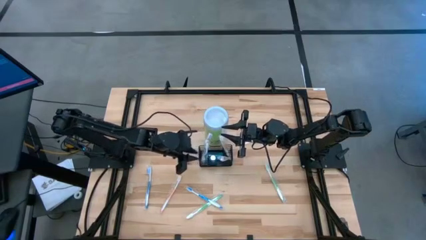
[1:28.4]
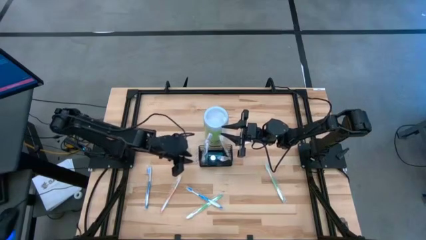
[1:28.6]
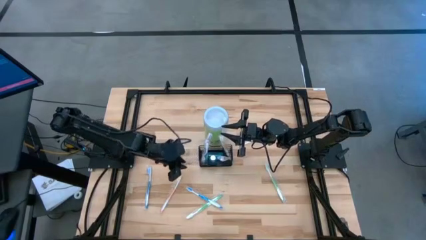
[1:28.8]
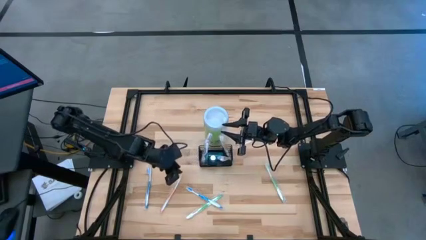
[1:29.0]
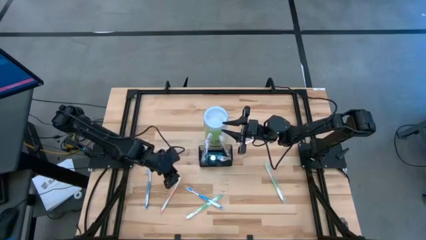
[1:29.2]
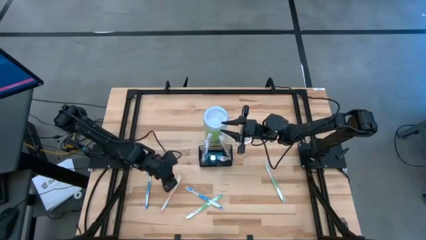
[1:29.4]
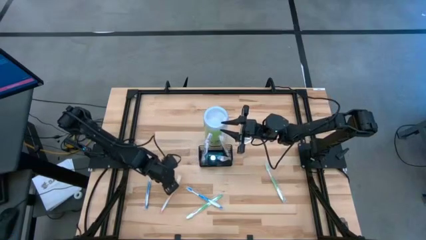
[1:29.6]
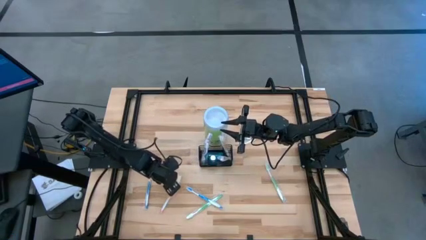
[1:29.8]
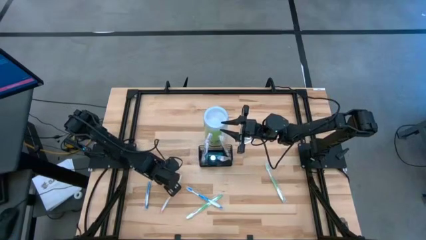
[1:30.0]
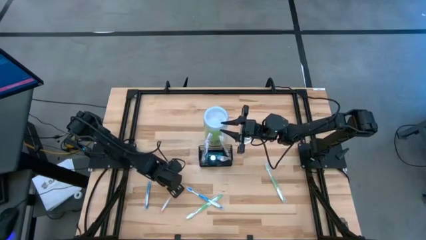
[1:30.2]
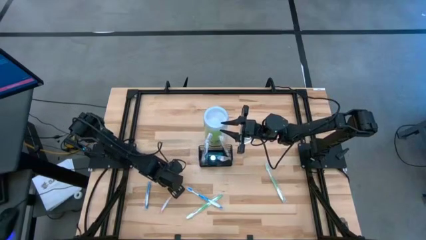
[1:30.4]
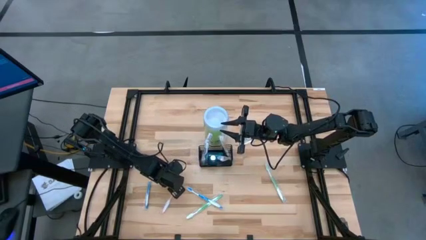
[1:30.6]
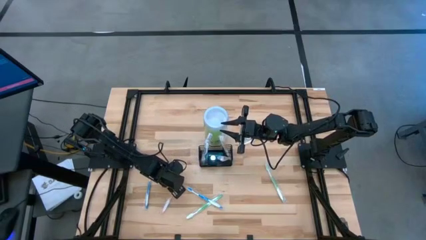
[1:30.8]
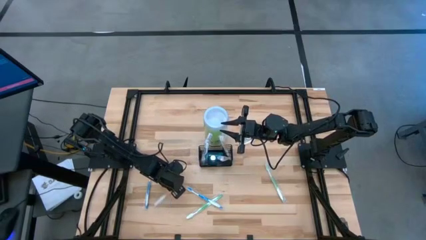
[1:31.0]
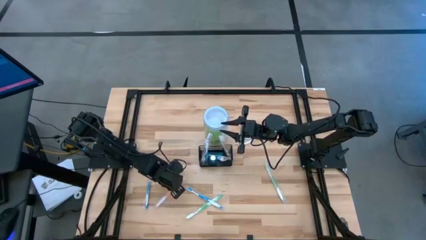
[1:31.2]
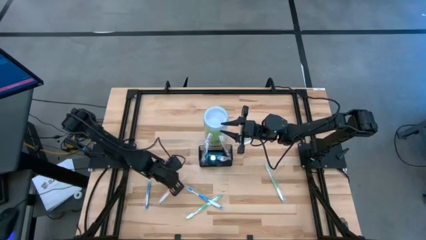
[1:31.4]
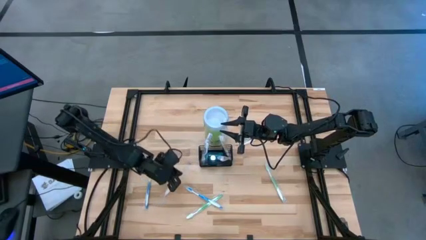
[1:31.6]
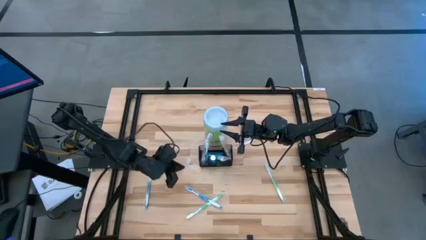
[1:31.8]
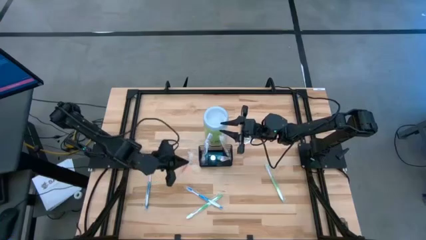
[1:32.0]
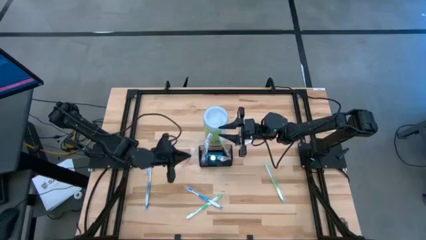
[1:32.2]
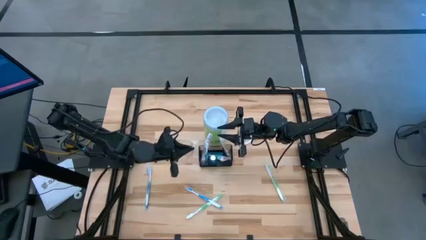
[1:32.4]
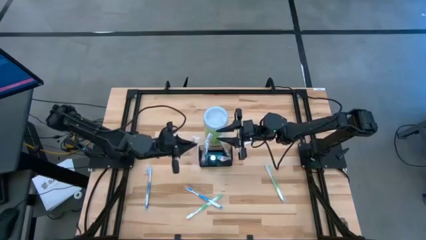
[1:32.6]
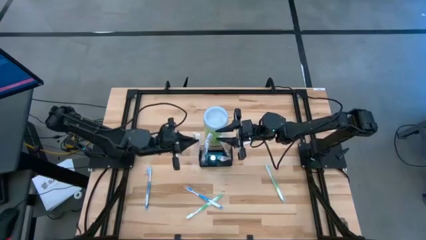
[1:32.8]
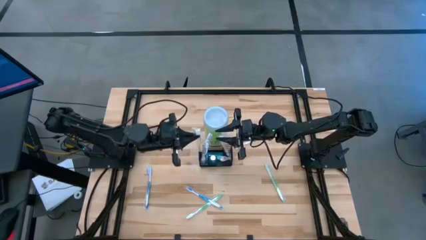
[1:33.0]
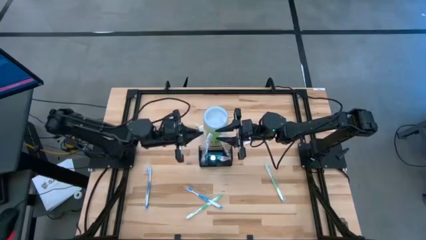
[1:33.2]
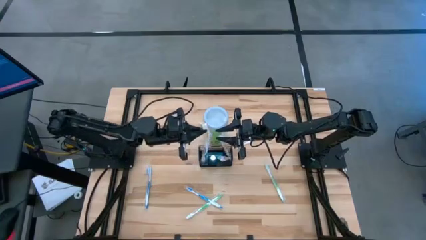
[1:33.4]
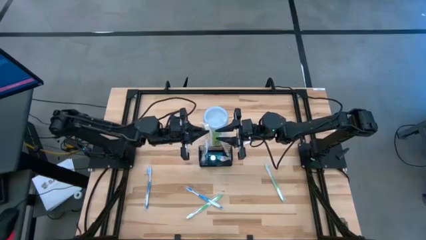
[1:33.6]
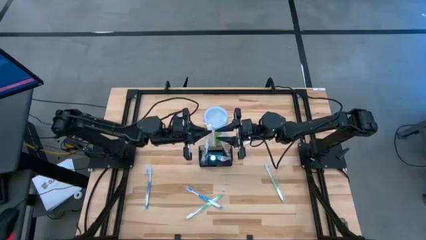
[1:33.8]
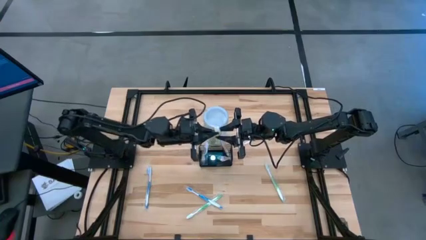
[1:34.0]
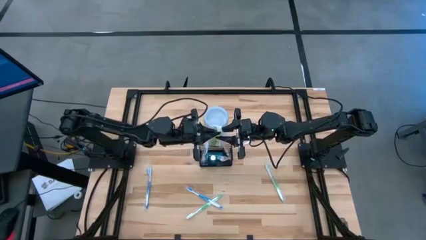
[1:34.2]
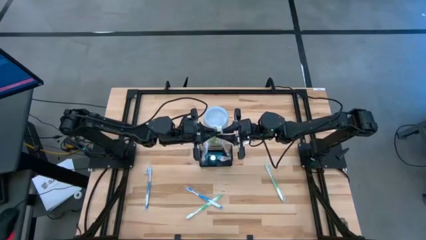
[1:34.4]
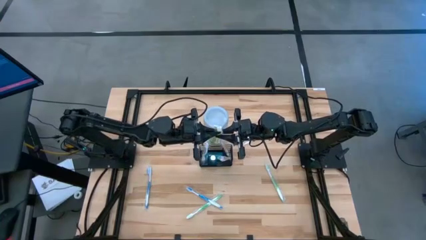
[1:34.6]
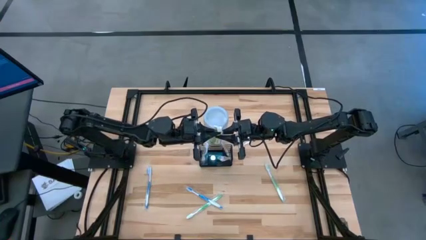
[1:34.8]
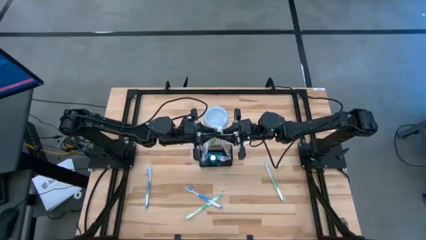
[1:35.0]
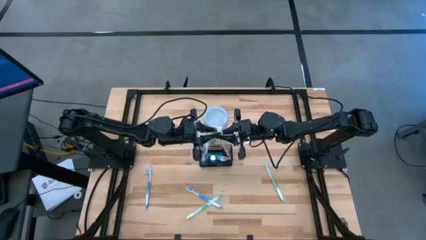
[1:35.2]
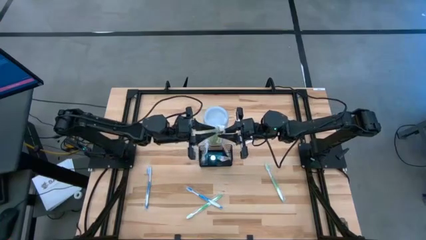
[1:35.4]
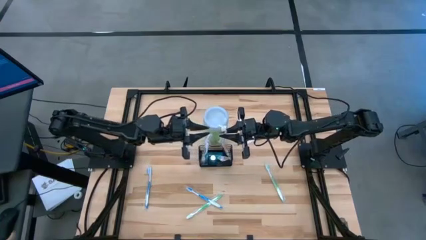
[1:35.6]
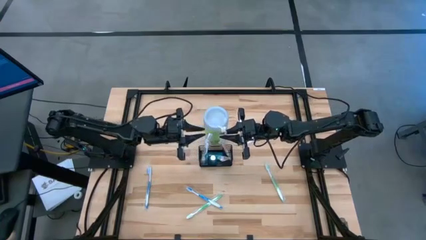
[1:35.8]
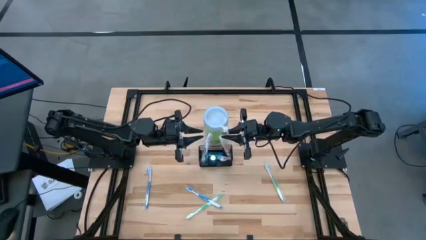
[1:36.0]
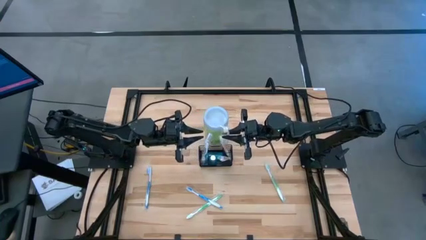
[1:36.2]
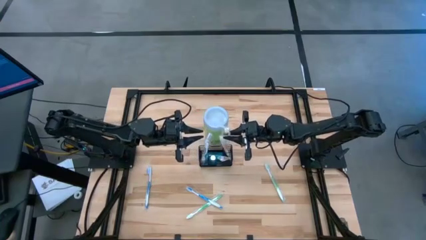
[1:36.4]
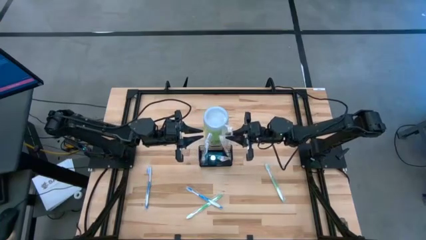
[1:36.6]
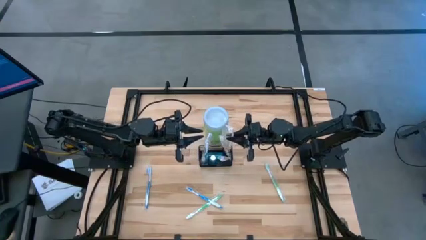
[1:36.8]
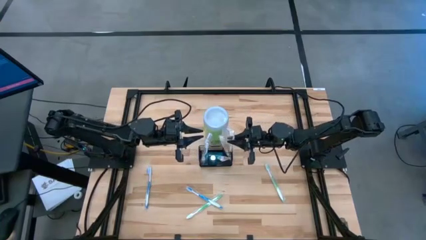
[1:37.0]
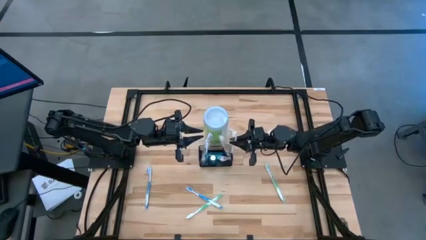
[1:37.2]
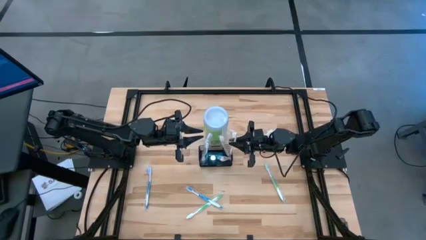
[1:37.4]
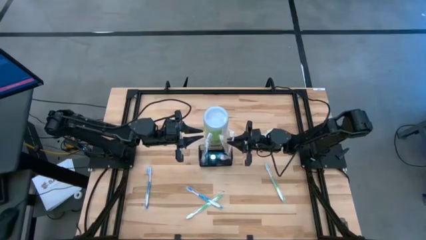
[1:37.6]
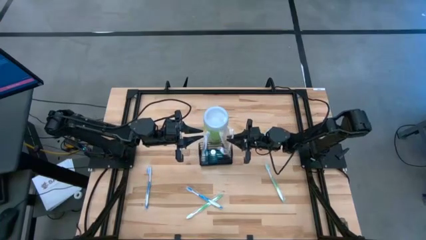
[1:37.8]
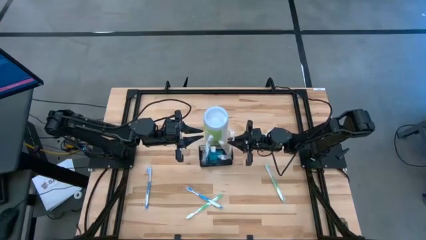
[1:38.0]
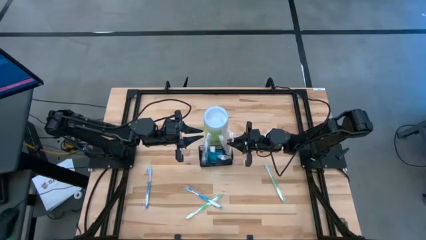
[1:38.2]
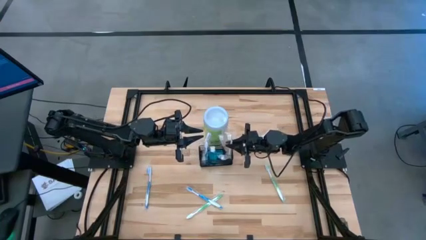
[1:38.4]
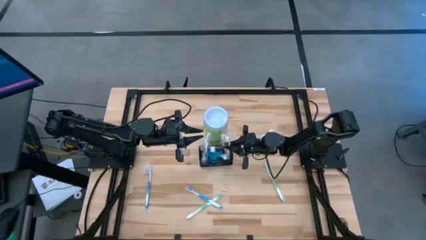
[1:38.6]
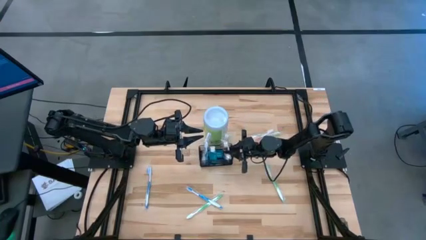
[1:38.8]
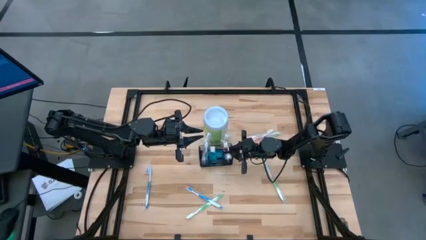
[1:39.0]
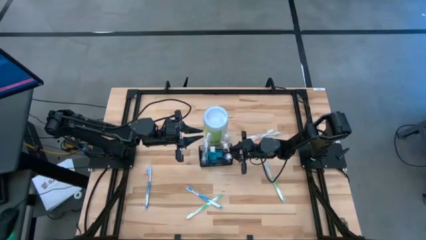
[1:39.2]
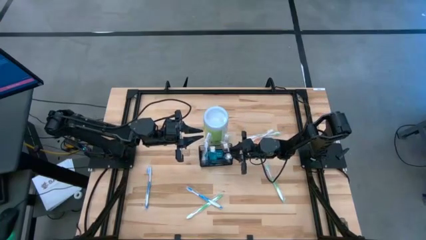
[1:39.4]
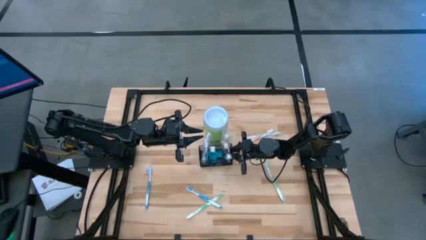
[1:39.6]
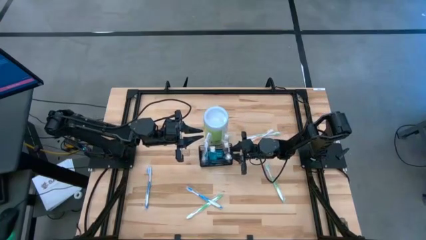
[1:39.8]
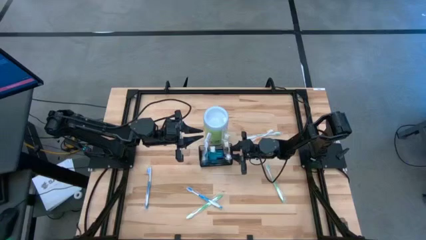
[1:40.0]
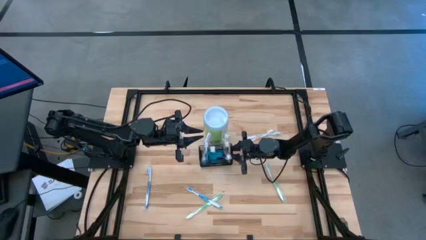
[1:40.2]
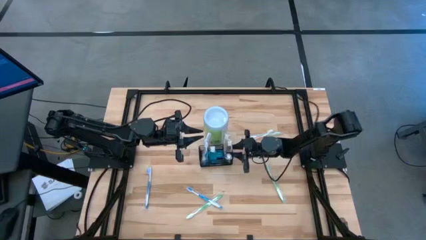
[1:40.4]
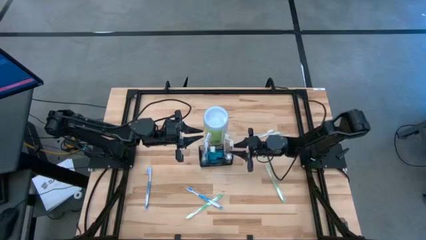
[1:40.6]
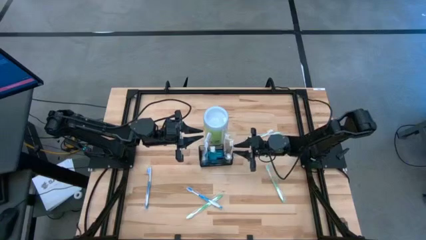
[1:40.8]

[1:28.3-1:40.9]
Task: Pick & Place toothbrushing station
Put the bottom orange toothbrush into the wire organizer

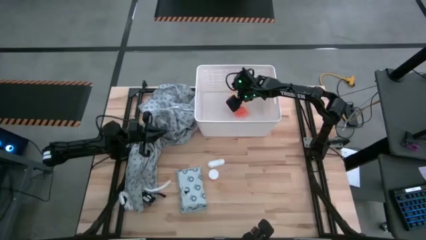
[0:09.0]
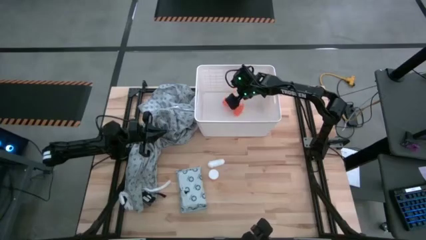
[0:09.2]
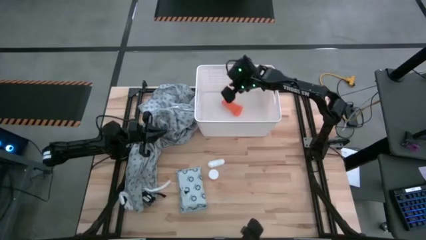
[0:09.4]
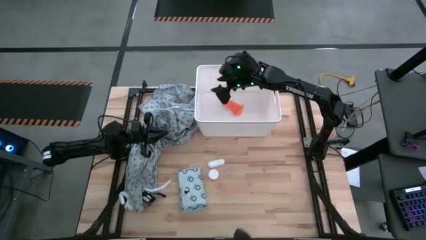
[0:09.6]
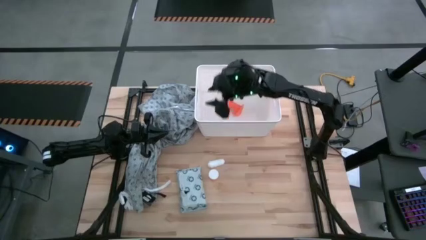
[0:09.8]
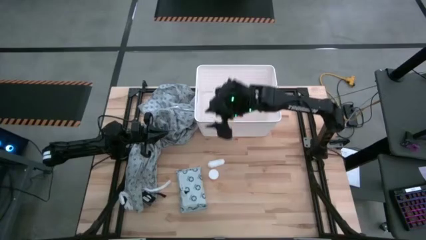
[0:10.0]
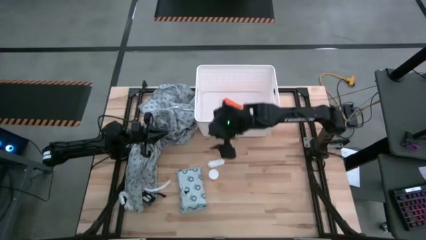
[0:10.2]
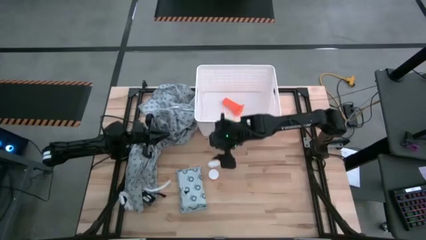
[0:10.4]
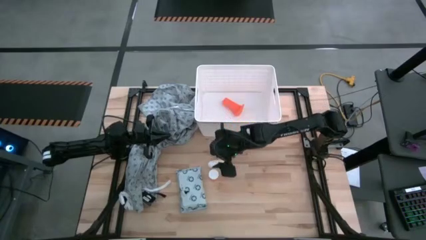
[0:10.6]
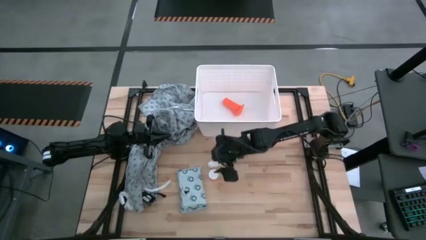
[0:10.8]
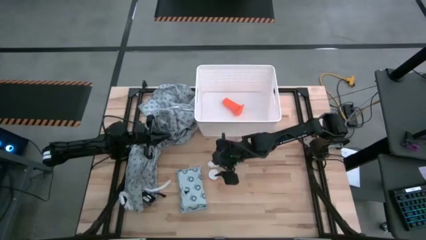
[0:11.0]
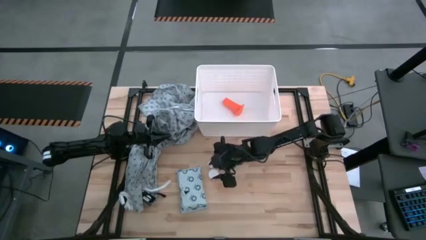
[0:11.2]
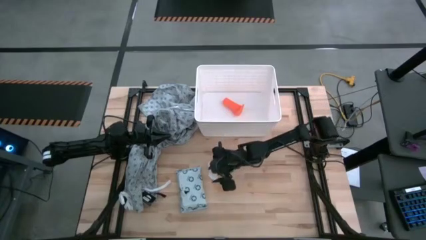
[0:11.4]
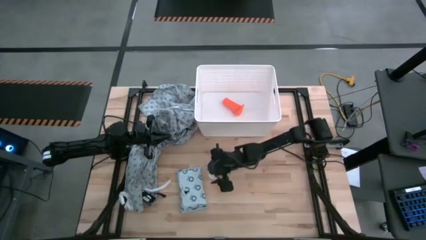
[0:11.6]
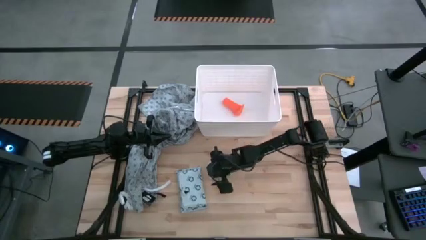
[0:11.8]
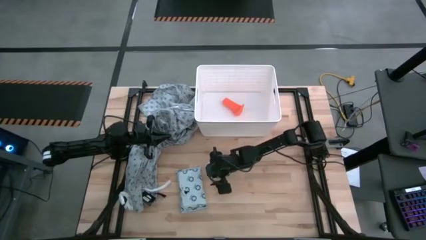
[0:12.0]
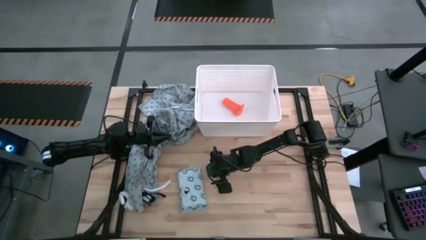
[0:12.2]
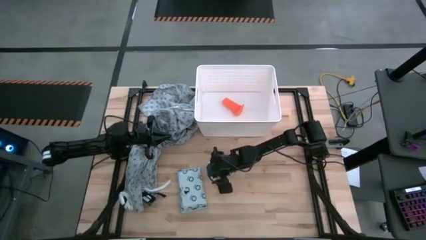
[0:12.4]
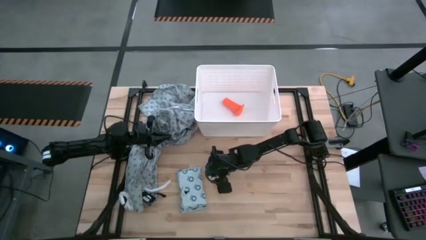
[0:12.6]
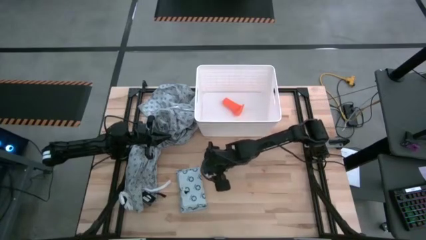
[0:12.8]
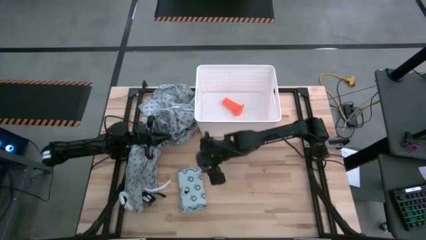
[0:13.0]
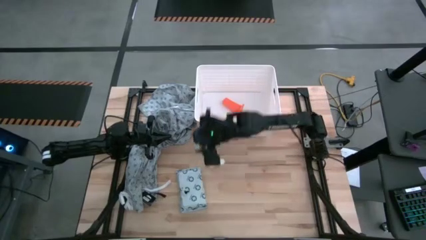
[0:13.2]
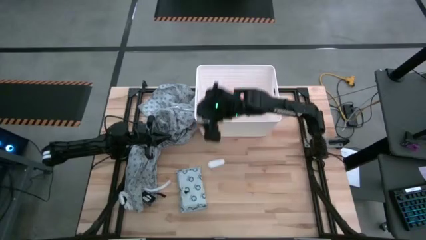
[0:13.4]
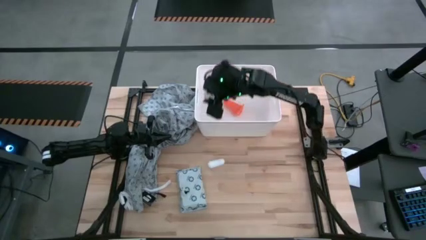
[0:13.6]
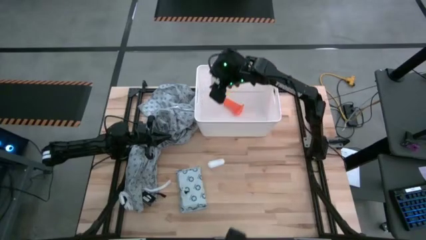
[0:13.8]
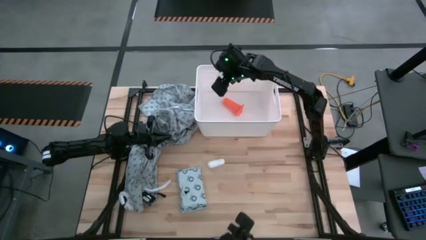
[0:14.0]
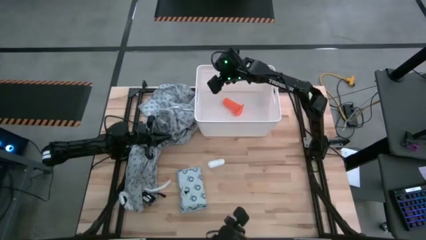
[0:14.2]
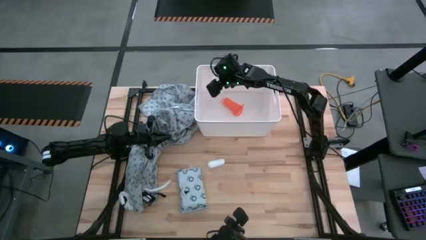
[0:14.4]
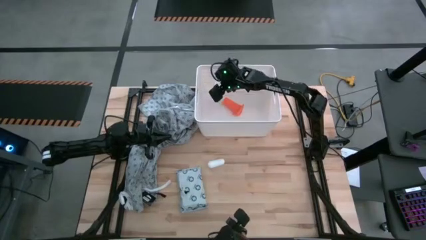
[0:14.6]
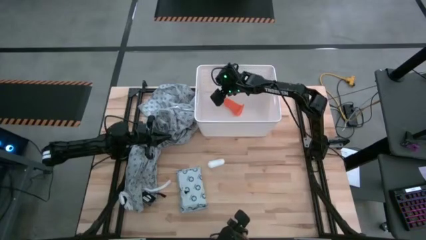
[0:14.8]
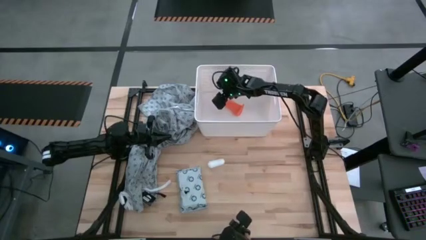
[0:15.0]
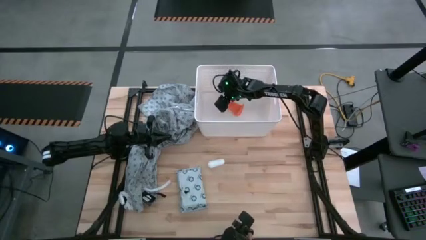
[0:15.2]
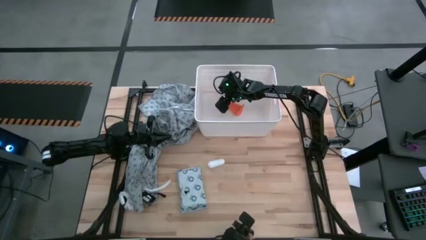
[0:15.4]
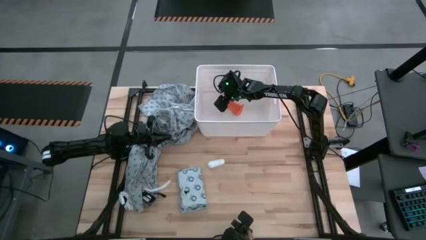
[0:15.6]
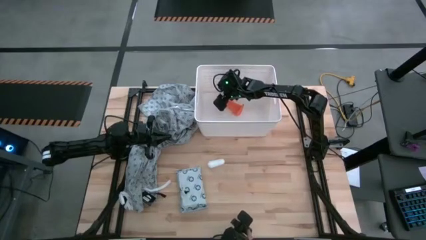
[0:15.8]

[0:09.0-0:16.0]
Task: Pick & place medical supplies in basket/bin
Put the orange medicine bottle into the white bin
